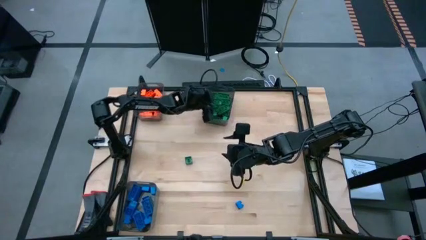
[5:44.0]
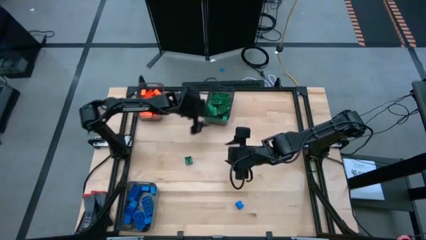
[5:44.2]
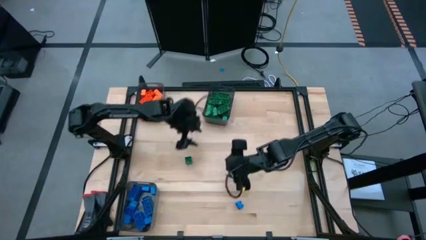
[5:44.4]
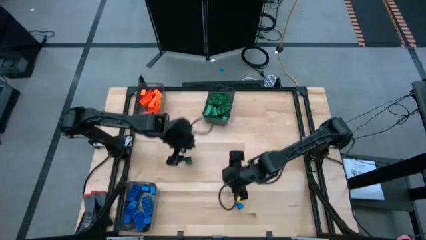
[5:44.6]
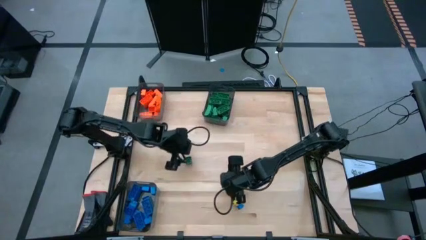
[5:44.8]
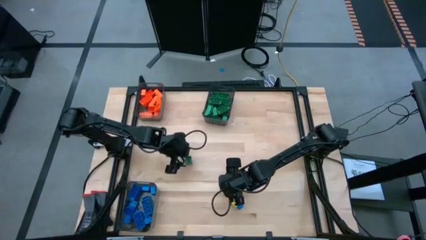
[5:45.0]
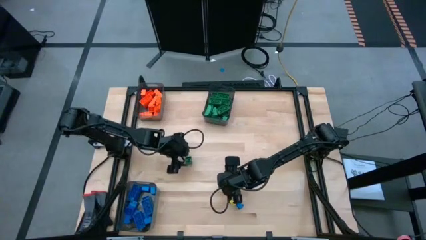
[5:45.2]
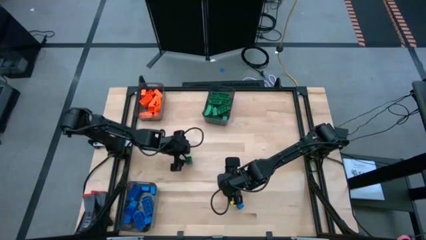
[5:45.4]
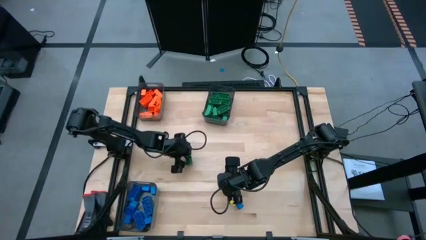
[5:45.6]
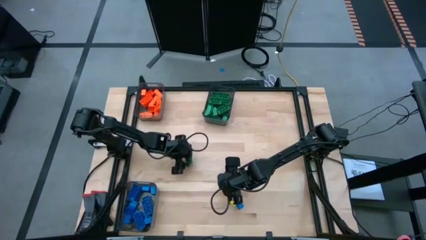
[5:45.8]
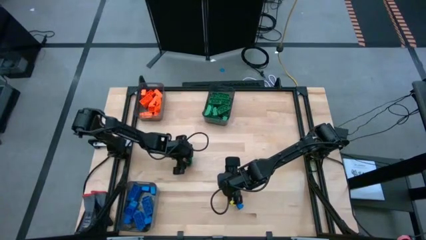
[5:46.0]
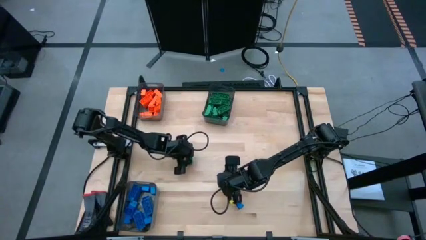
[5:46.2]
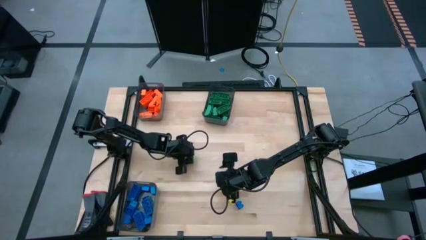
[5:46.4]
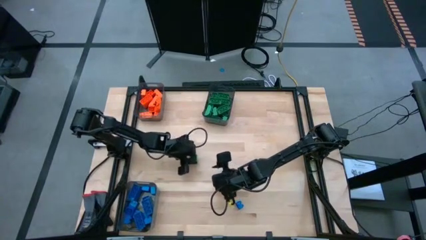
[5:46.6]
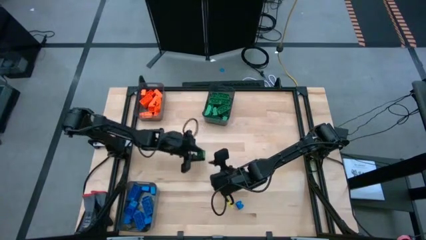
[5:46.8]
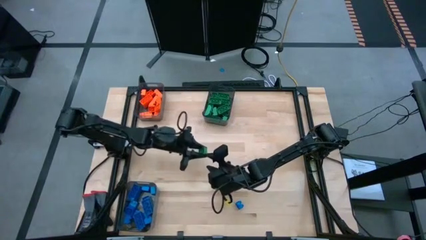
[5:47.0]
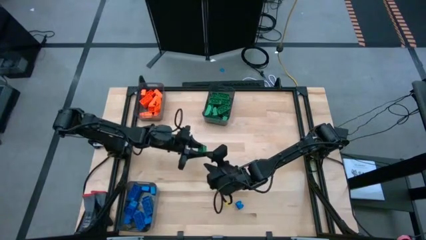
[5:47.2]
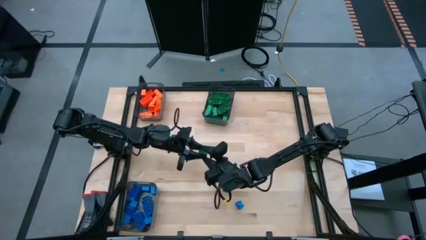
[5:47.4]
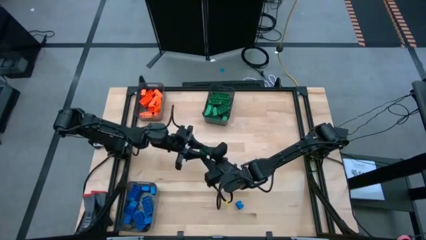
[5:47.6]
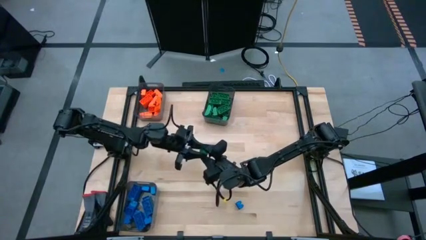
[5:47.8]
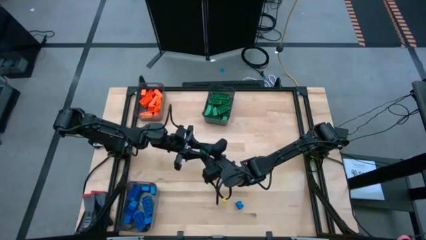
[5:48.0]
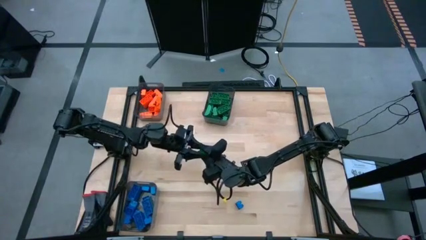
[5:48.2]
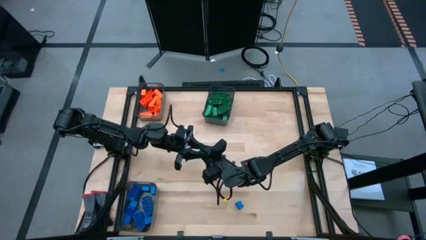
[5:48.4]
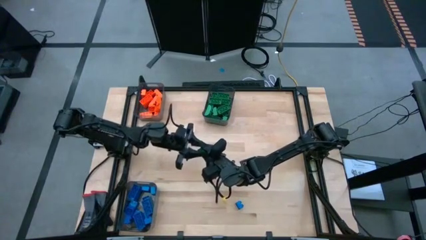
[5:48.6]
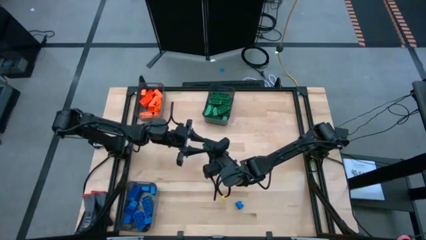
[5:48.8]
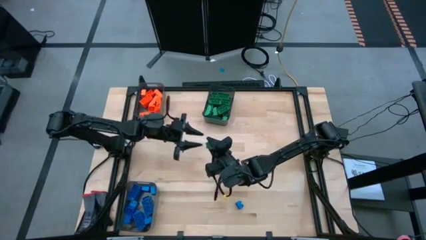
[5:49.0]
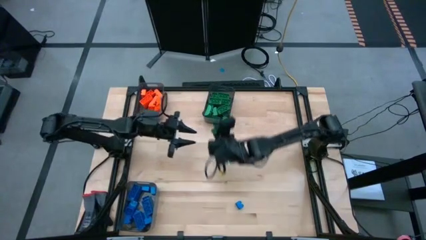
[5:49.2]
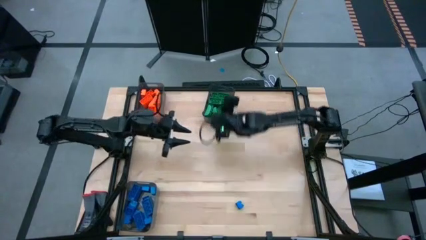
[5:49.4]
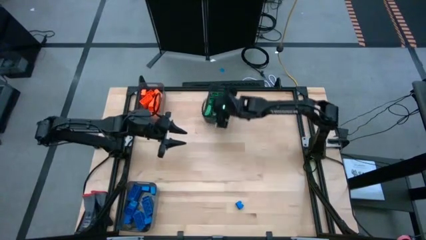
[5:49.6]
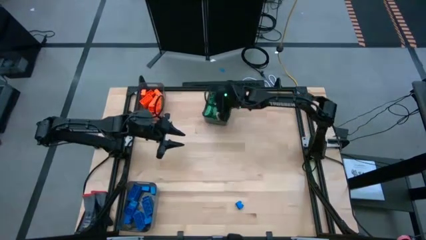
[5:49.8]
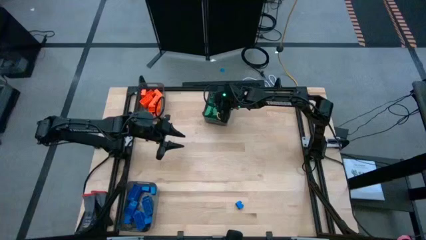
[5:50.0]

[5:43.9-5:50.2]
Task: Sort blocks
Put the green game piece into the top right black transparent bin

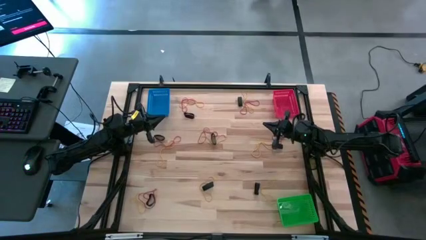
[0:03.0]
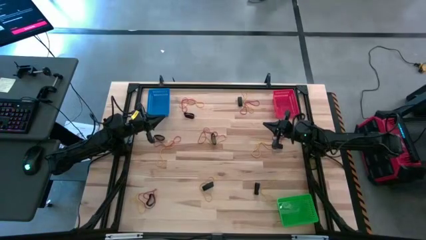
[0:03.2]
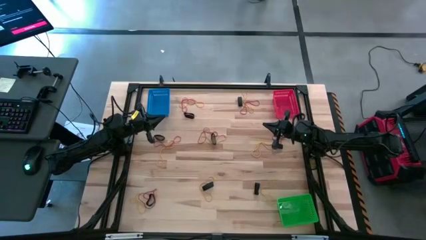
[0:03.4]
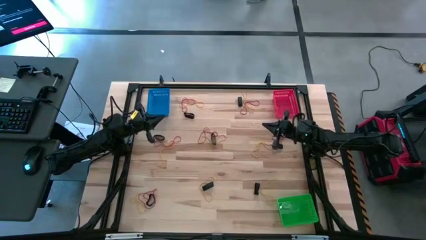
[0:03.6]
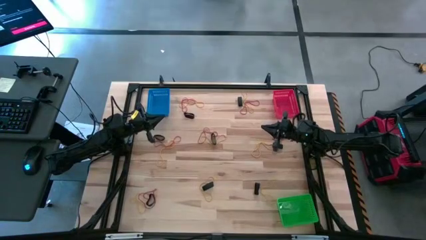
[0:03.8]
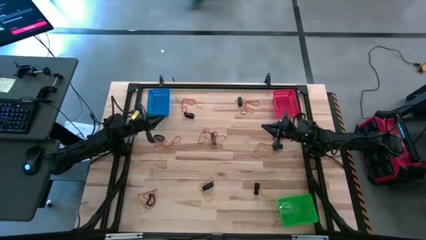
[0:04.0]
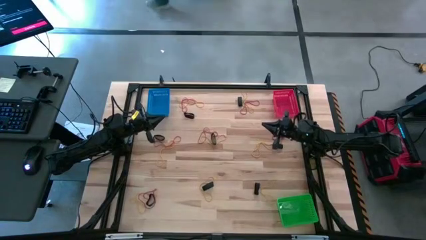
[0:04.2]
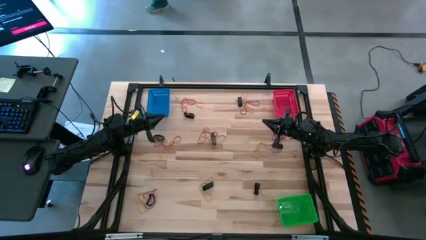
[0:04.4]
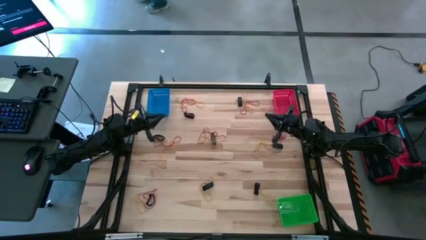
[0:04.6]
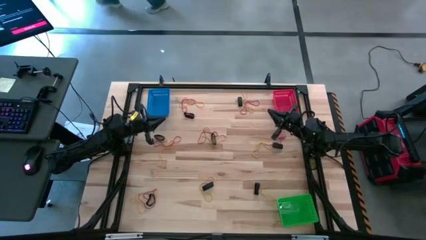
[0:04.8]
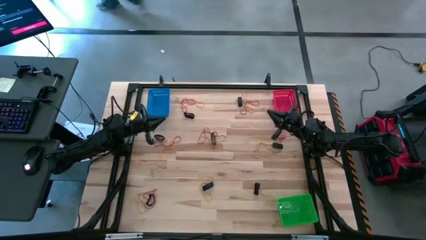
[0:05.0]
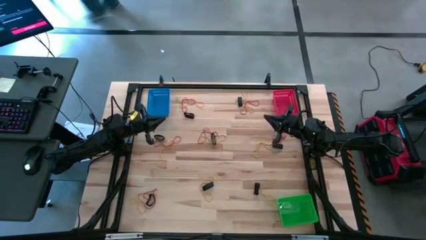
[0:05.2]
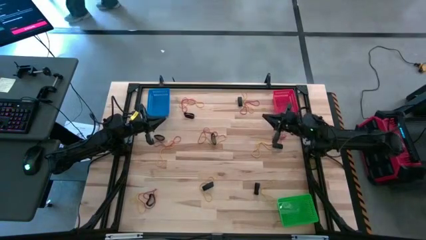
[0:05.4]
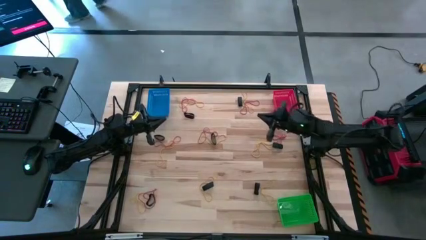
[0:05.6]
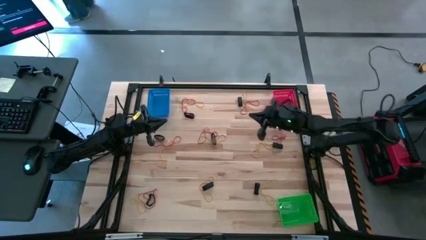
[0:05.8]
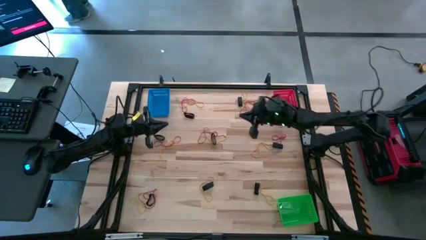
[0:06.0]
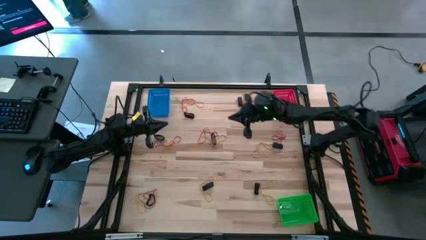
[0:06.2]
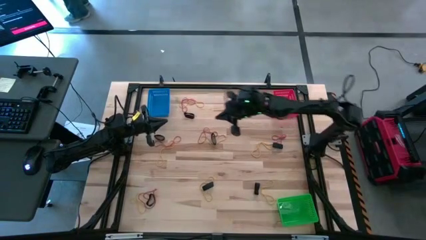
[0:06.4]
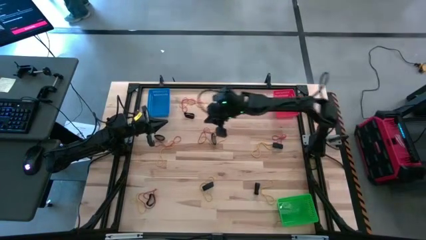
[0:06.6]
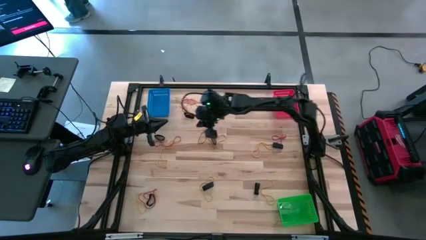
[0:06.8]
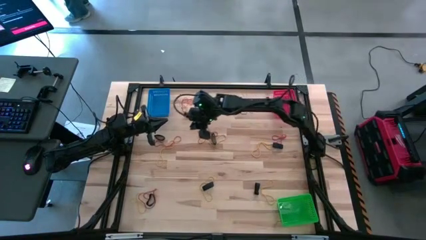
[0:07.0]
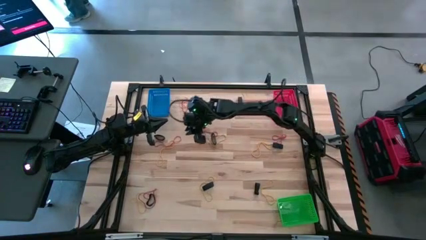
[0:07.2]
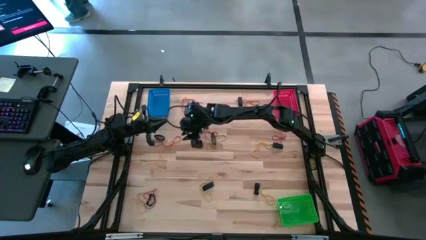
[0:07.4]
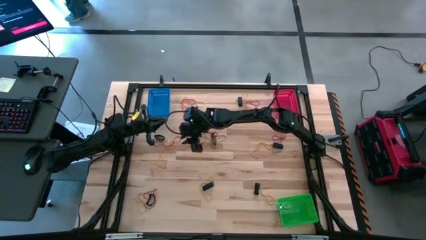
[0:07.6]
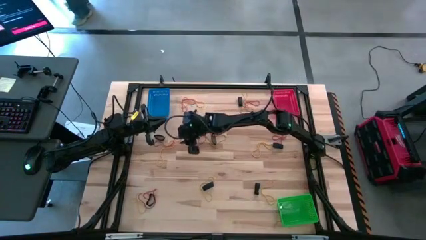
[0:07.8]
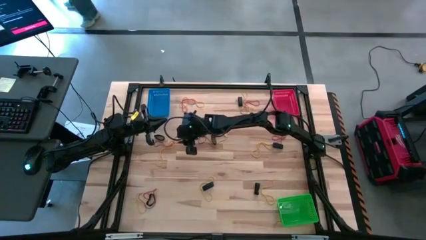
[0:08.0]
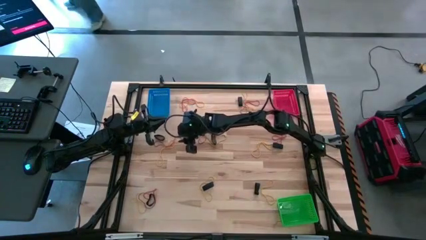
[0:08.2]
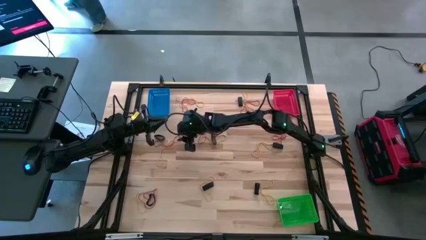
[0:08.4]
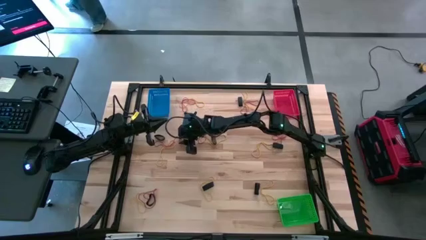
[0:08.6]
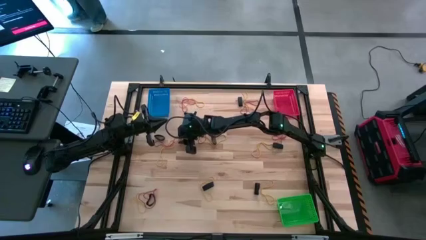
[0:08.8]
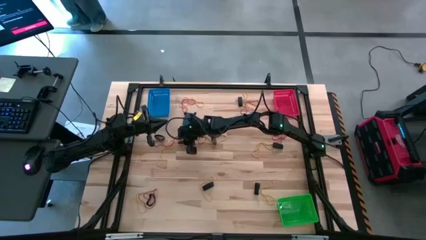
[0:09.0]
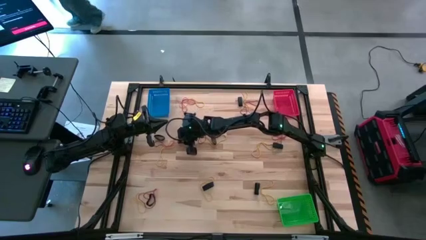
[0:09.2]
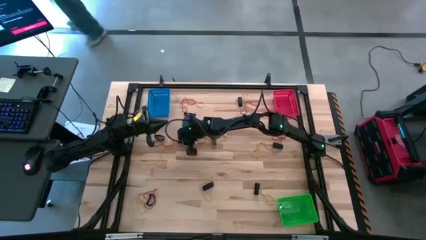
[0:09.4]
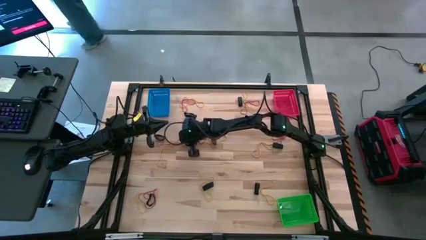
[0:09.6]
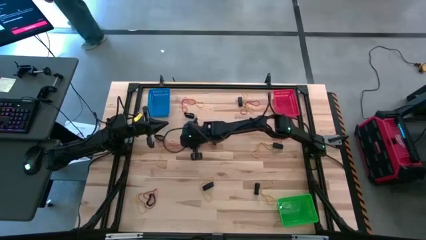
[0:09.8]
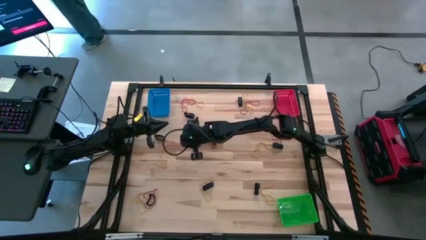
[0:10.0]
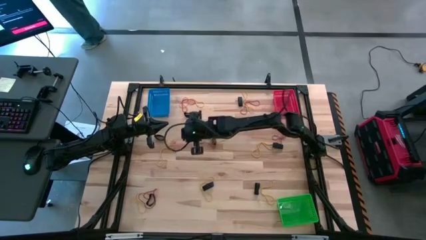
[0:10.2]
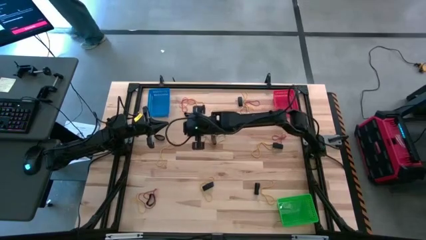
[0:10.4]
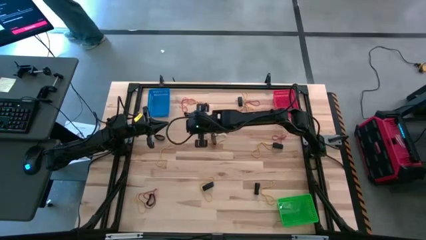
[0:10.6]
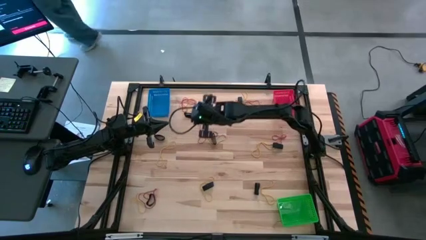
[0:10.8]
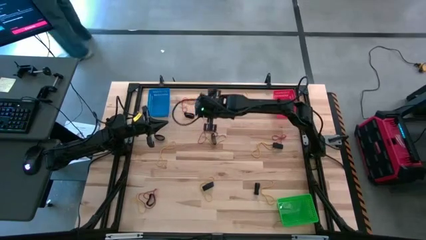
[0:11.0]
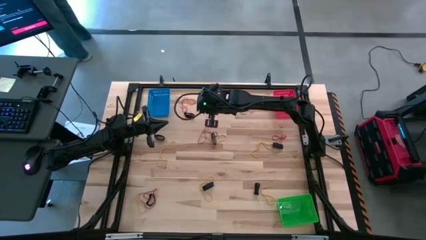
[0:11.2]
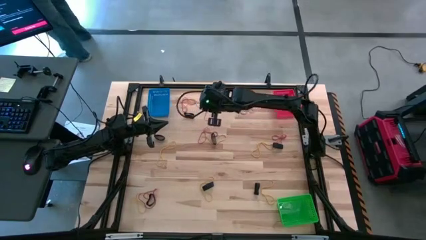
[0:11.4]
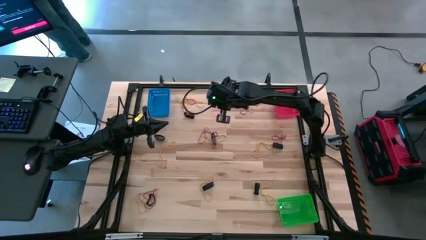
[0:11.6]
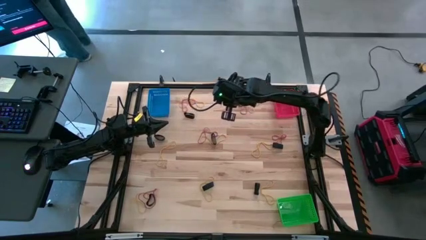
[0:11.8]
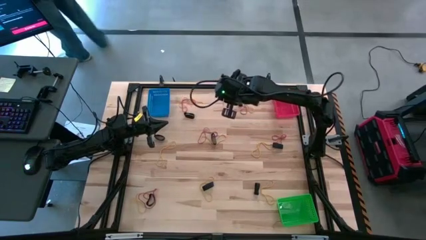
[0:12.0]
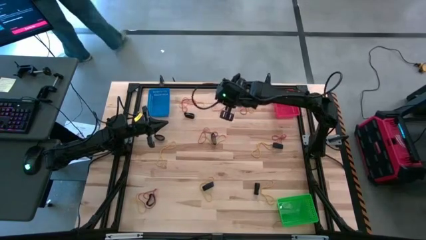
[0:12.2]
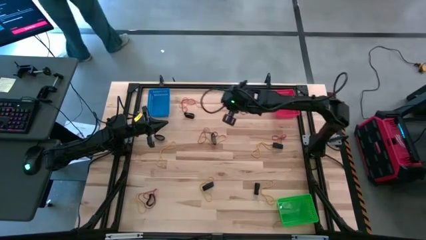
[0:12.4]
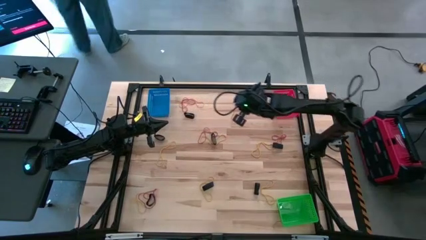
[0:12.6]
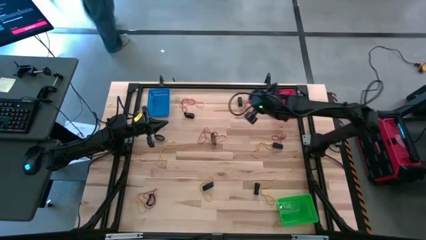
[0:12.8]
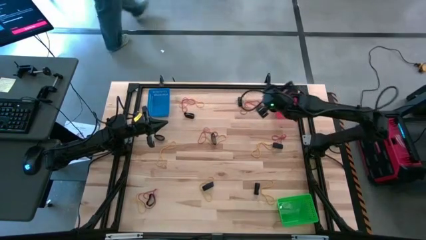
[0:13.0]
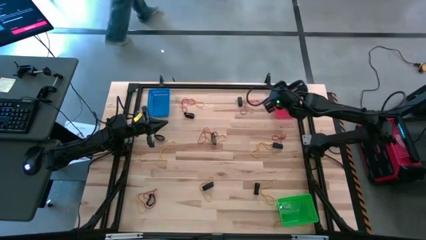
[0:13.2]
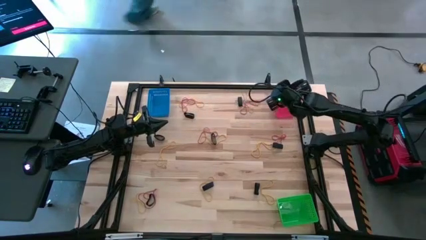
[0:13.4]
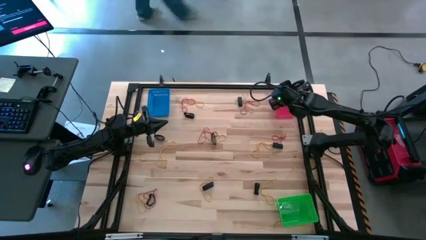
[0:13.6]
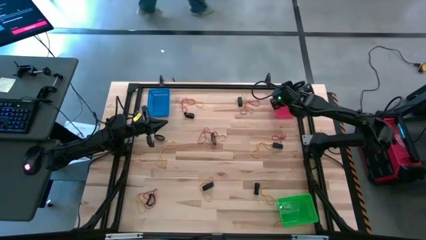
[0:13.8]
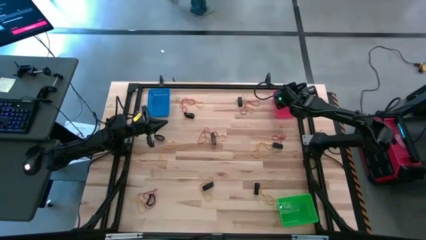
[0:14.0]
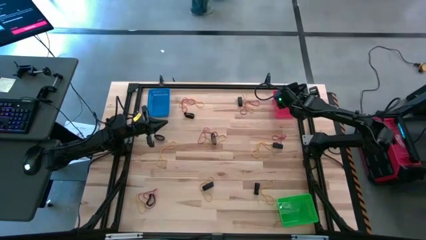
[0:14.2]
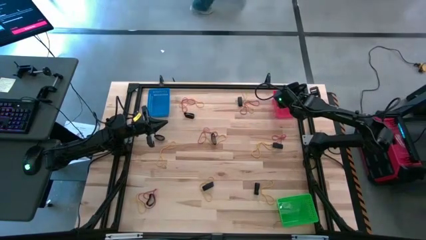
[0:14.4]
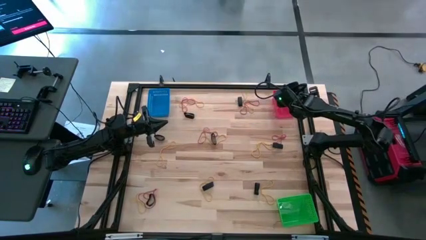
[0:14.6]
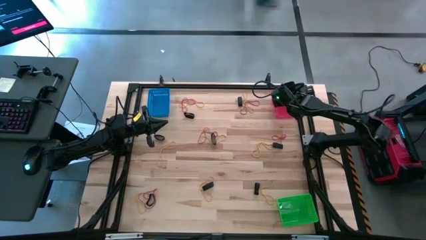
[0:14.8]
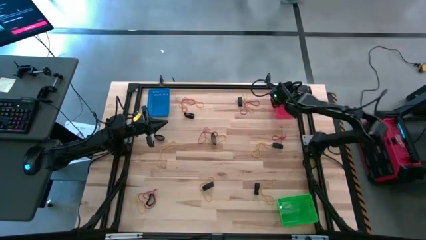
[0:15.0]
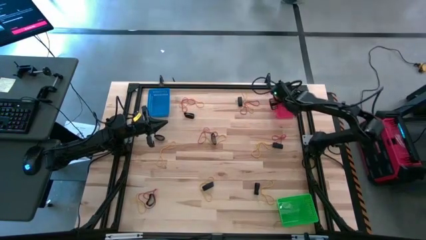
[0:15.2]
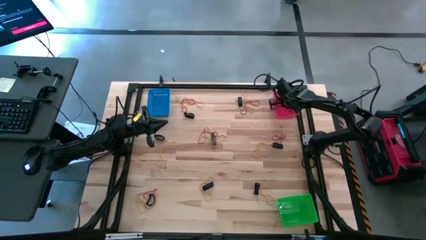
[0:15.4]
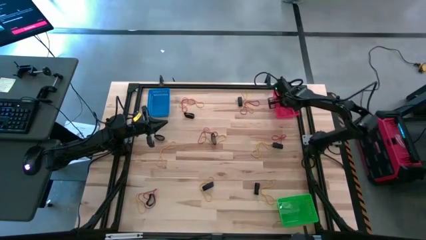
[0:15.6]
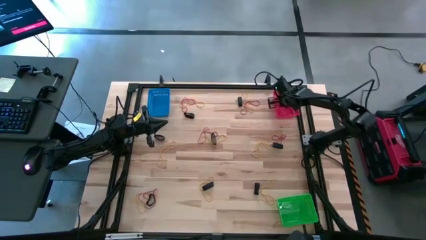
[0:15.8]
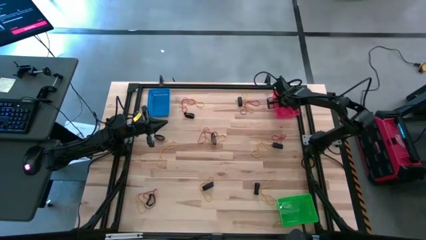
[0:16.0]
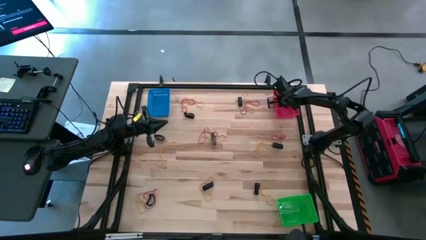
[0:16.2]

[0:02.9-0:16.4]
Task: Sort rubber bands into baskets
Put the red rubber band into the red bin
